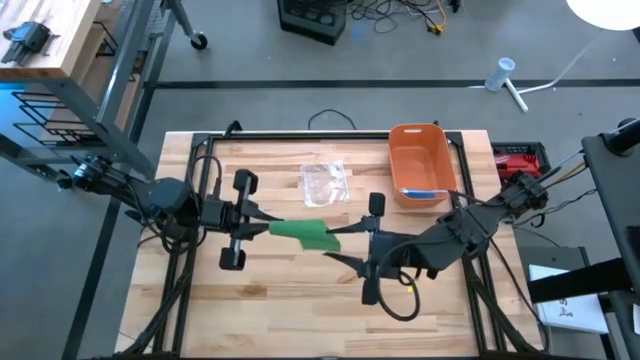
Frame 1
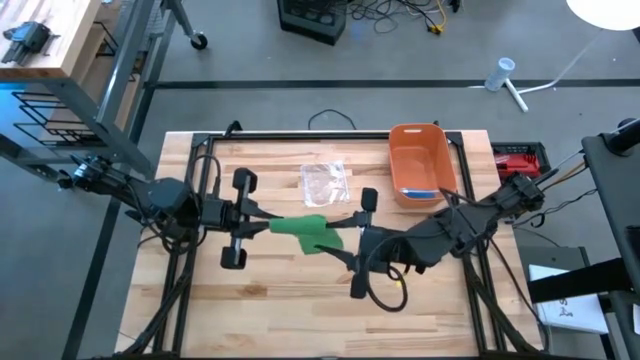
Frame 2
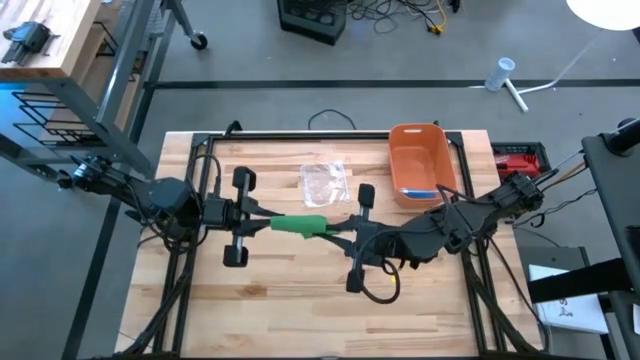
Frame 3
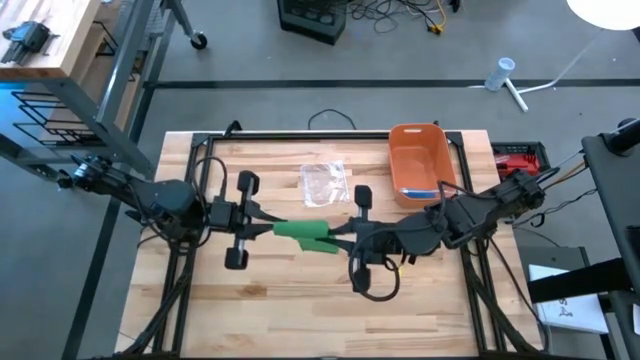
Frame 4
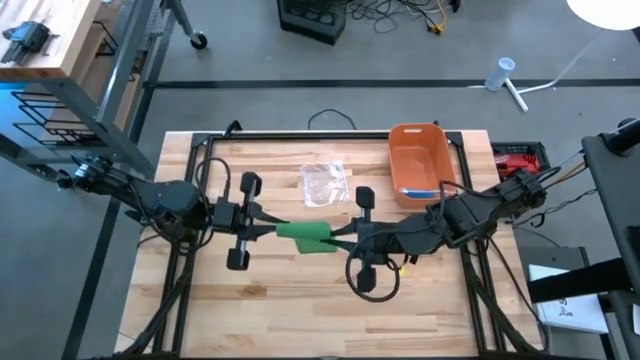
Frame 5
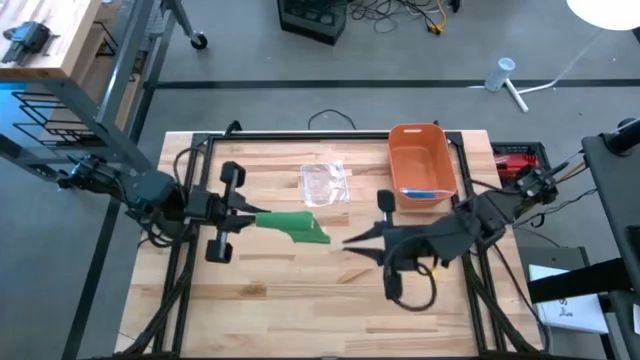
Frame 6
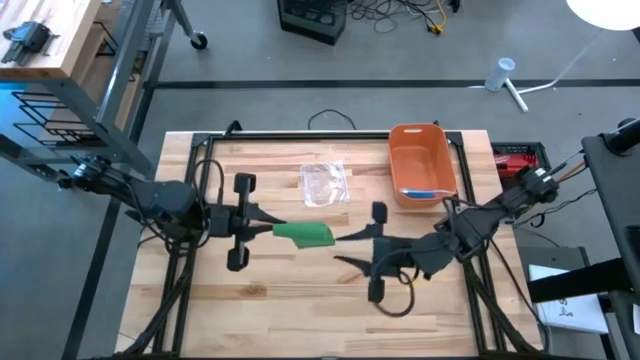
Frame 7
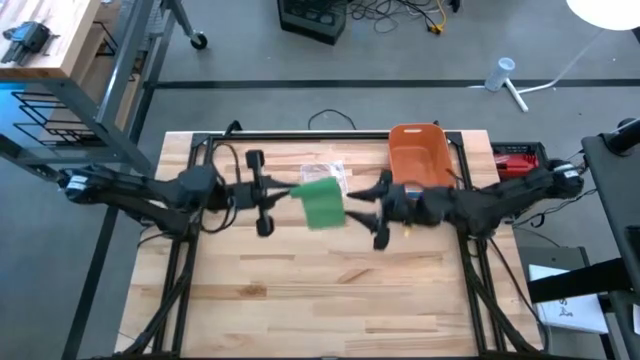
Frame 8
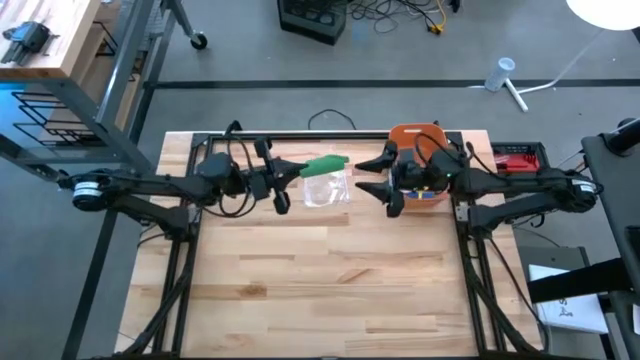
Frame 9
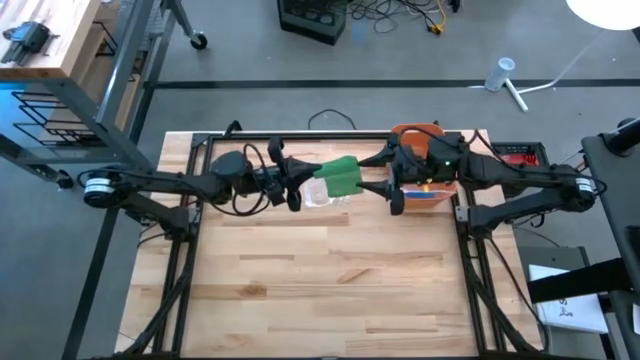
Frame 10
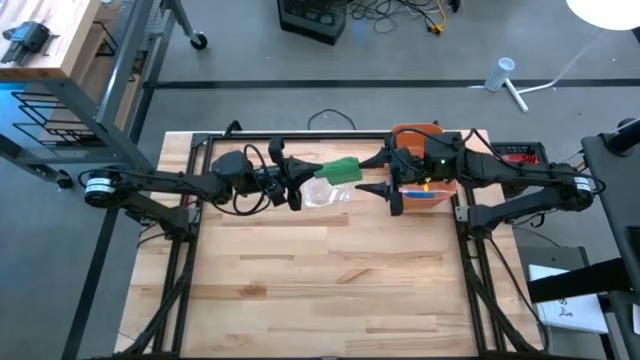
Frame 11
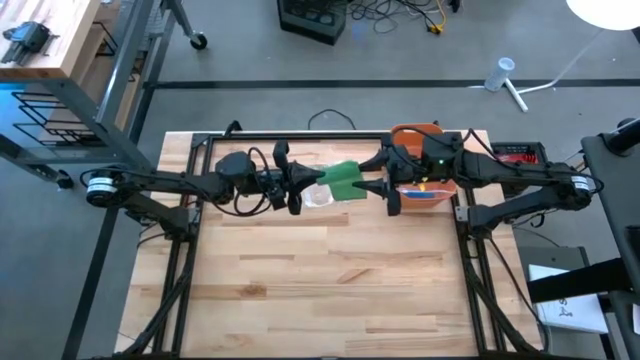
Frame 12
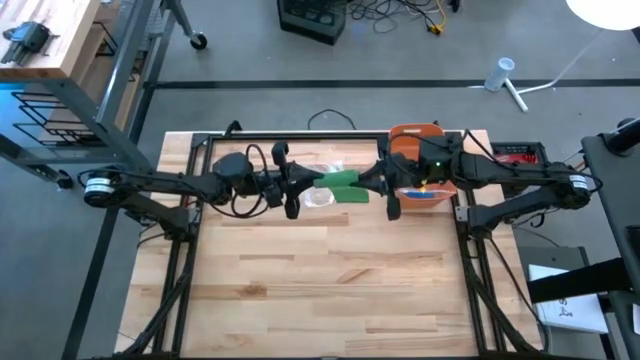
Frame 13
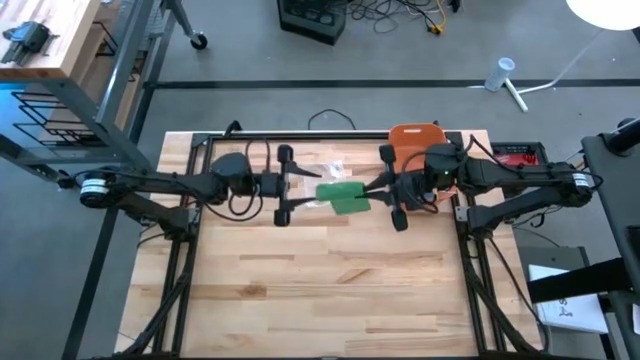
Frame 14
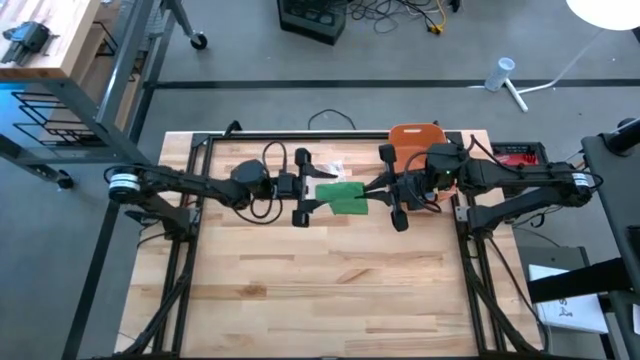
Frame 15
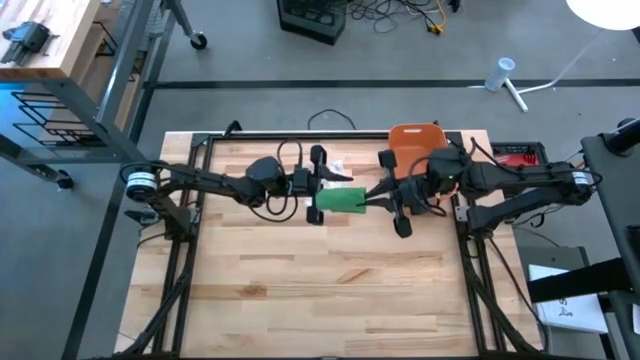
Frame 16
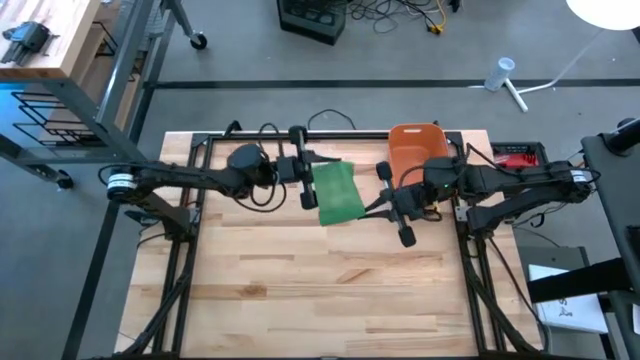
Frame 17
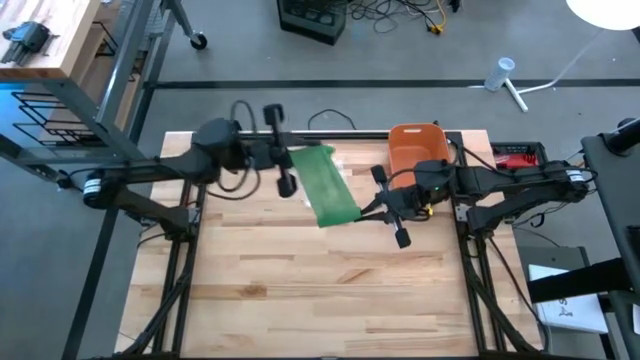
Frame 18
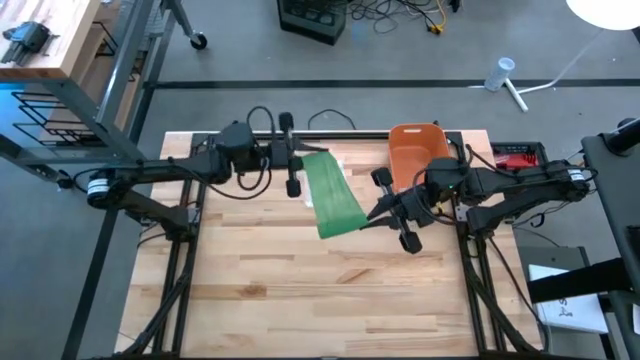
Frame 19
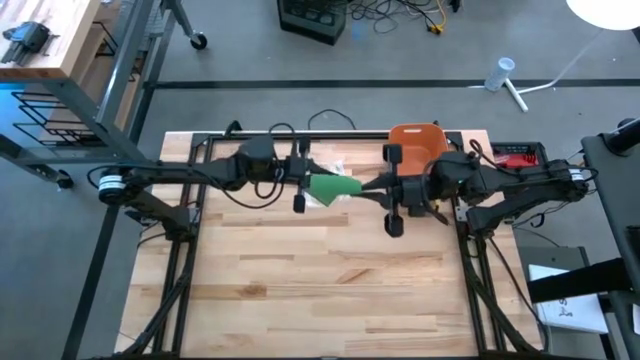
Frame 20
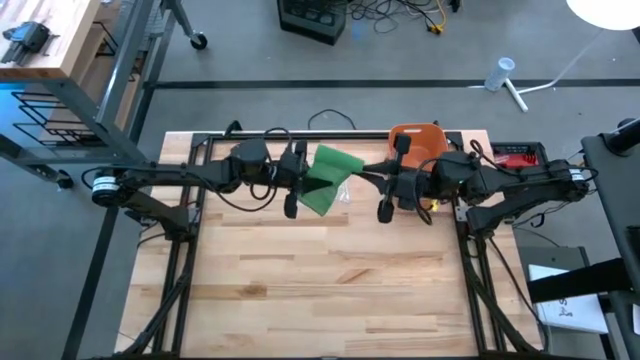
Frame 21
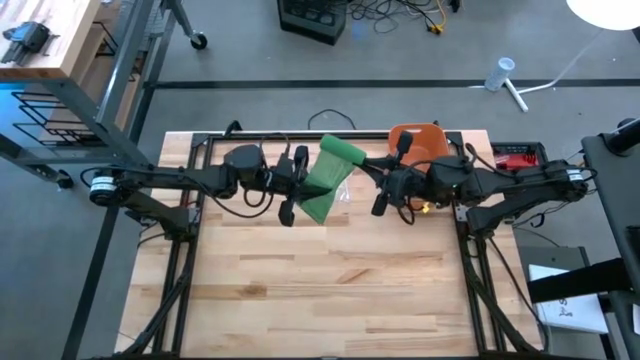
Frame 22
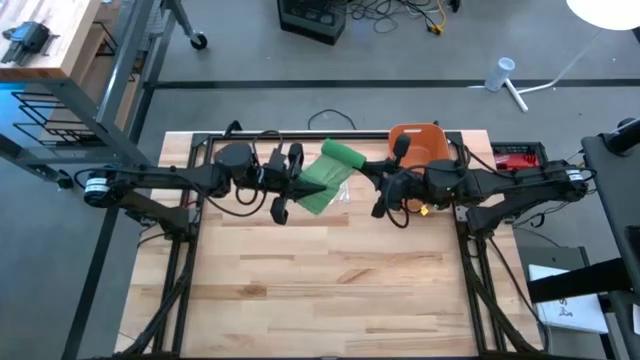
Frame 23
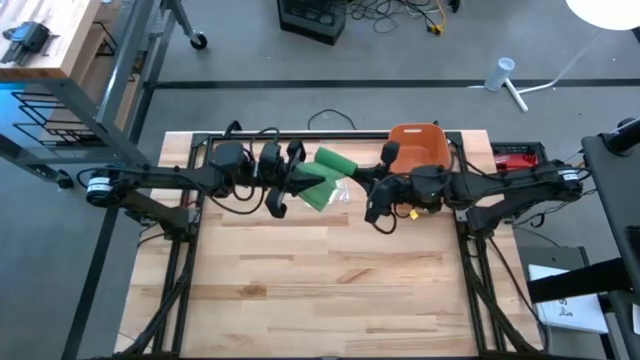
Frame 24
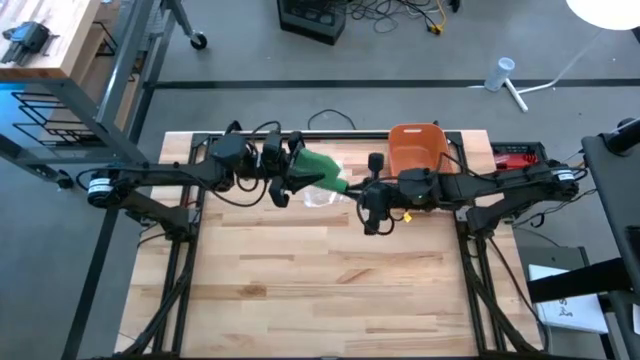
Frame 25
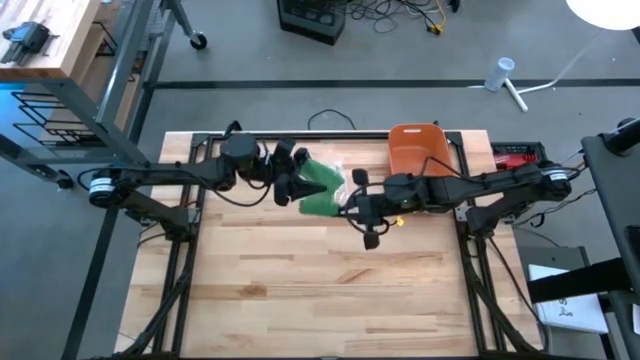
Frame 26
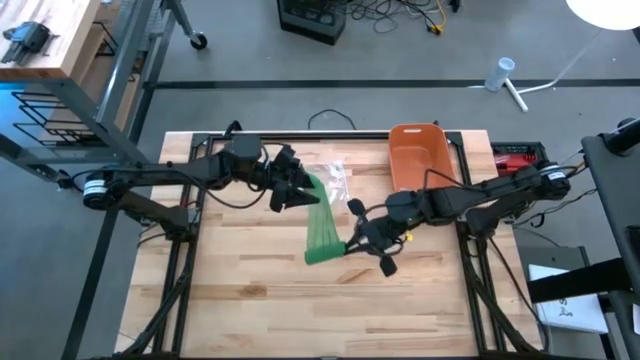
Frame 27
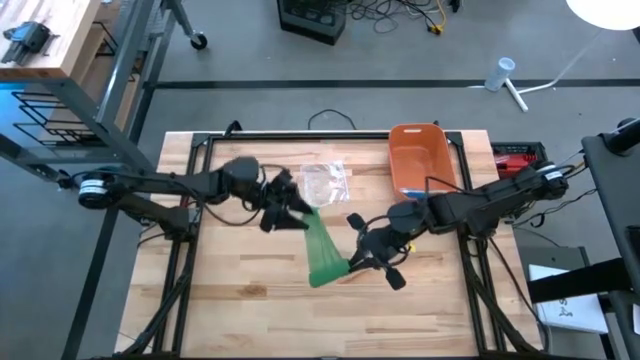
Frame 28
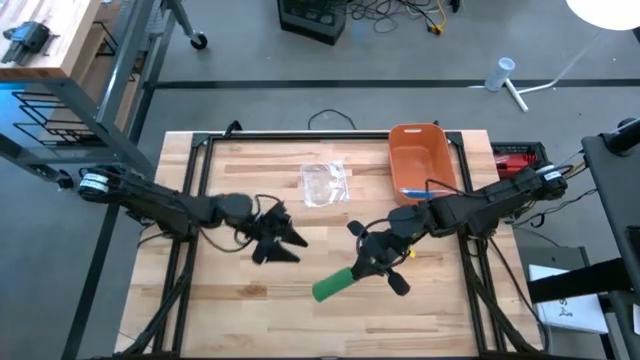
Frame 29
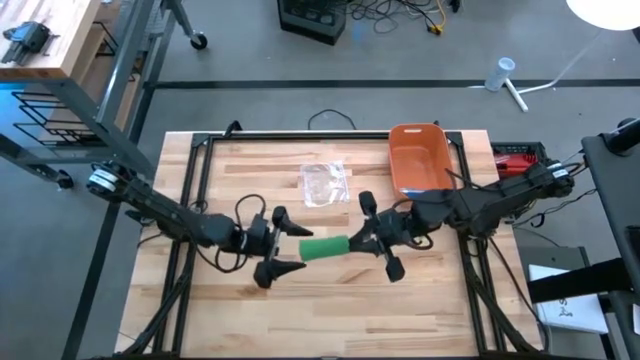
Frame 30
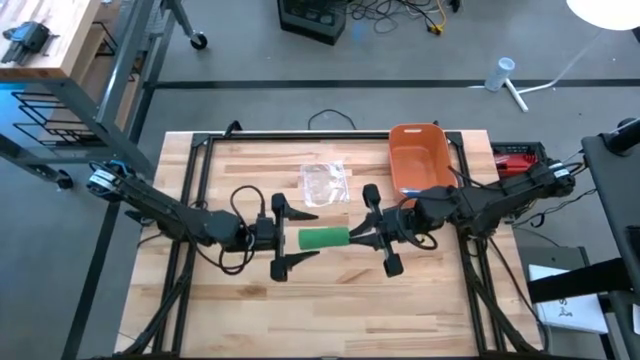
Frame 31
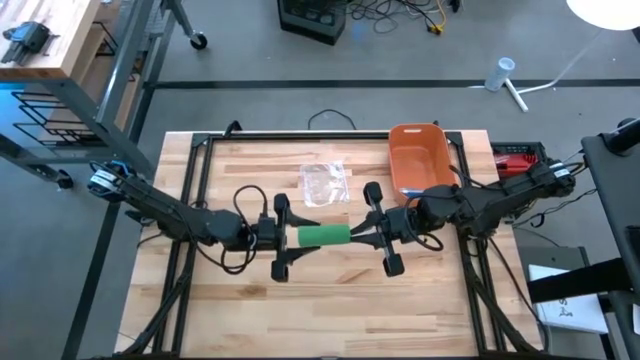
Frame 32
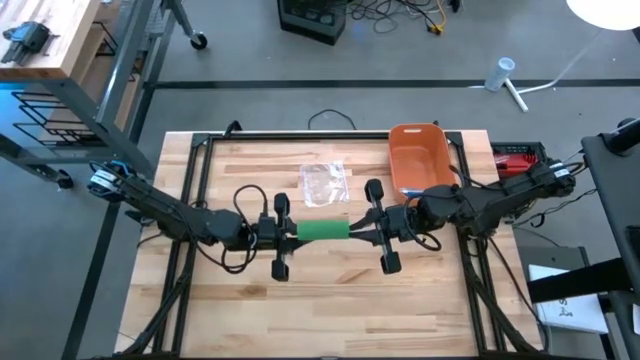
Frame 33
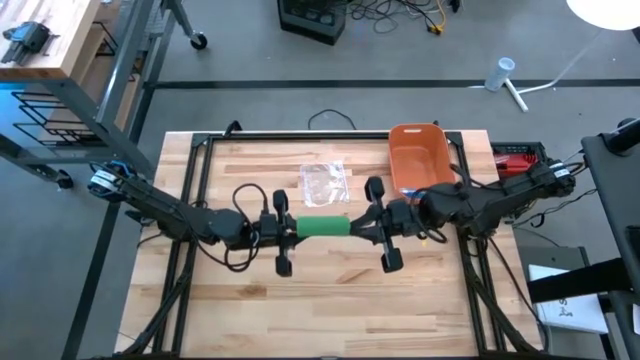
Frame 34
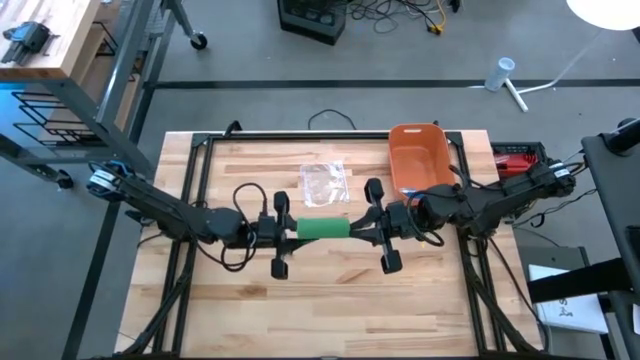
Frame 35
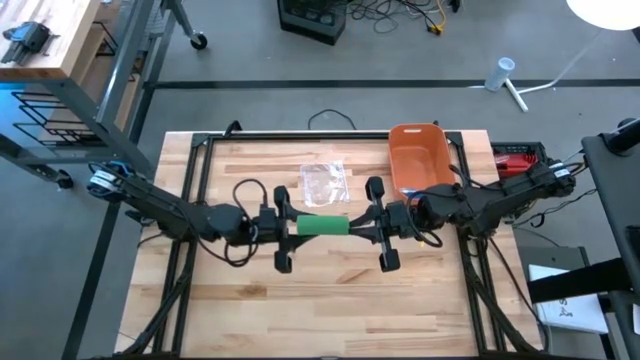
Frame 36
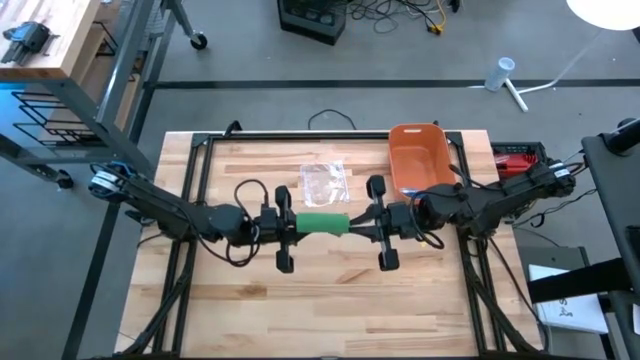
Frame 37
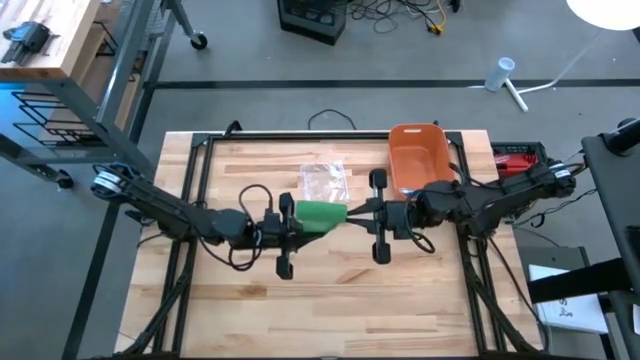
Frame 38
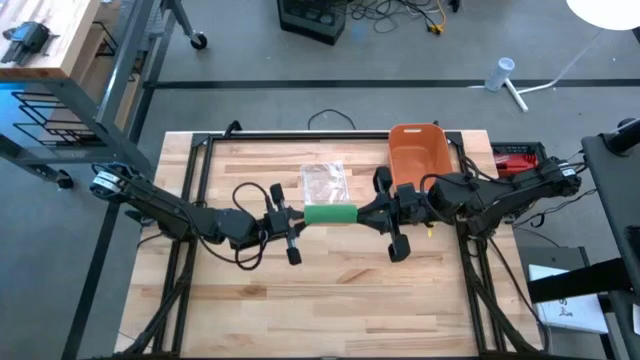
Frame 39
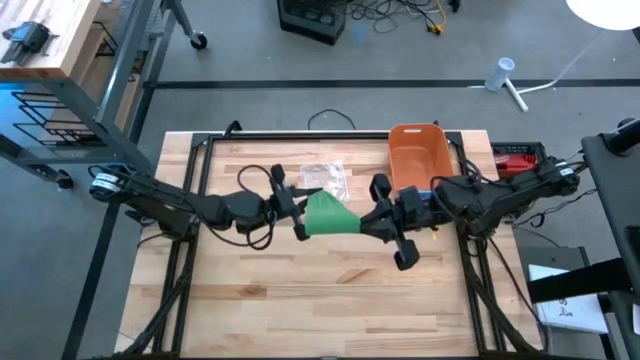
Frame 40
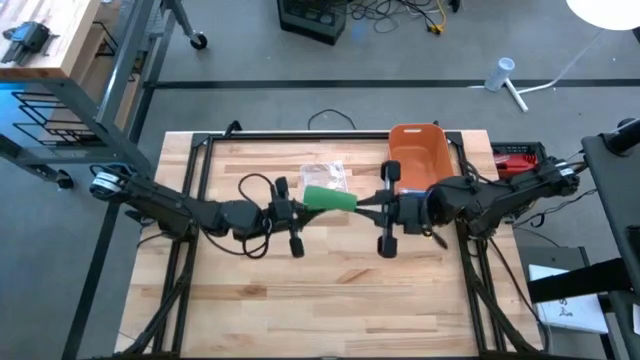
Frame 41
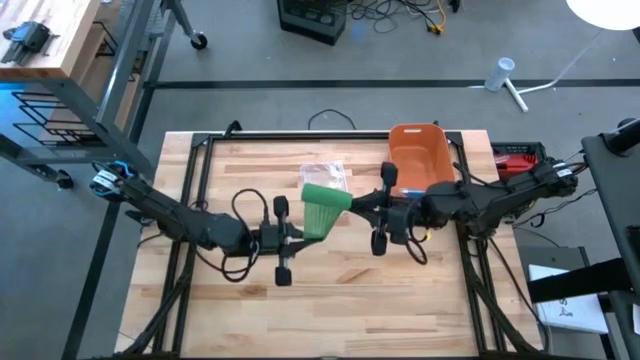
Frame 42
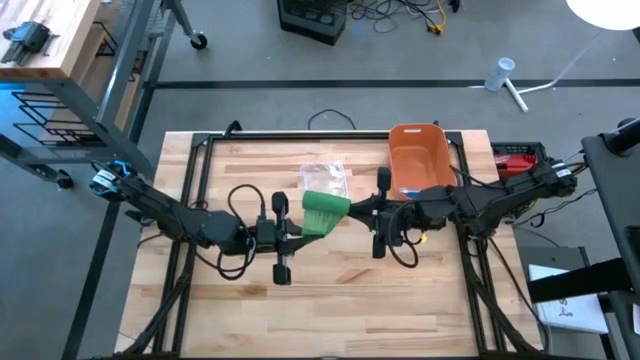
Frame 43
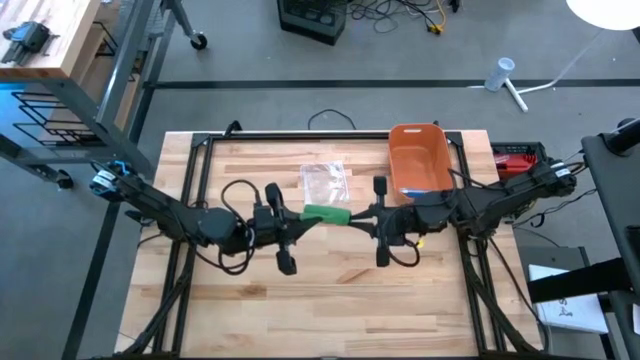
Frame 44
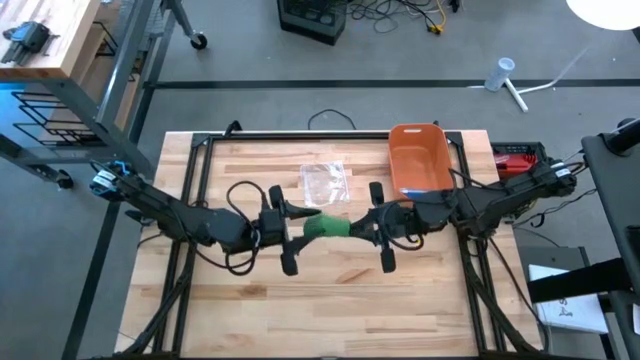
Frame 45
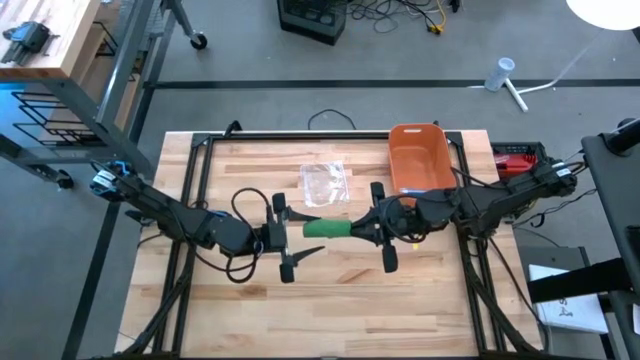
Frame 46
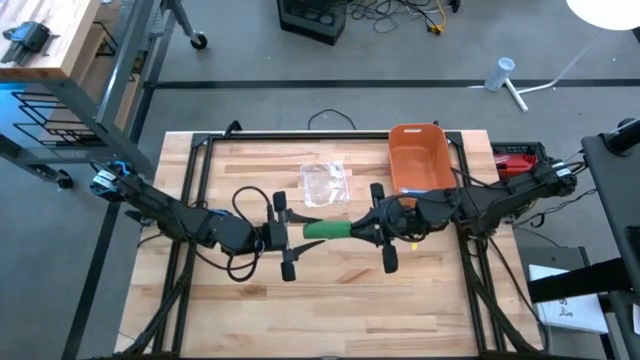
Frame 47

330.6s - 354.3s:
Task: Roll bandage
Roll the green bandage
